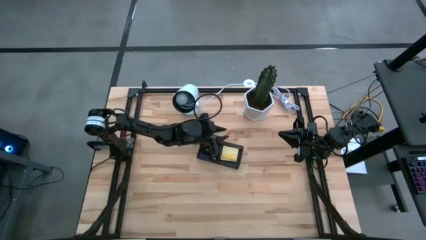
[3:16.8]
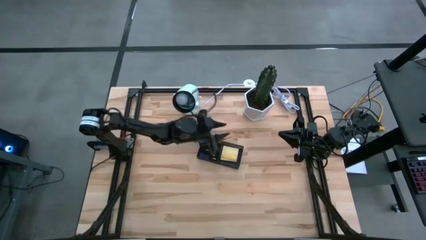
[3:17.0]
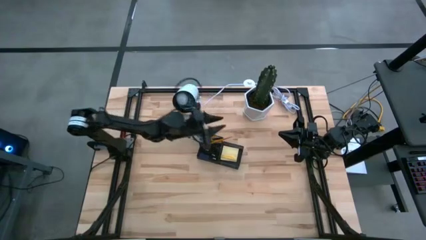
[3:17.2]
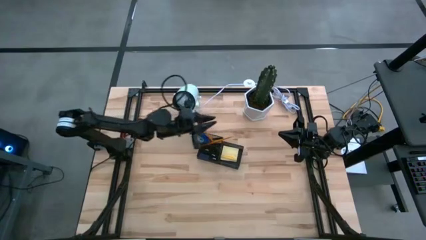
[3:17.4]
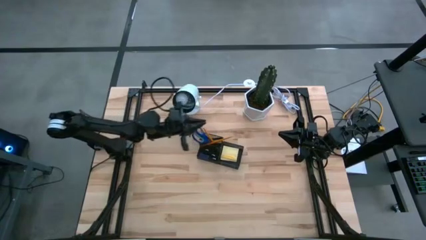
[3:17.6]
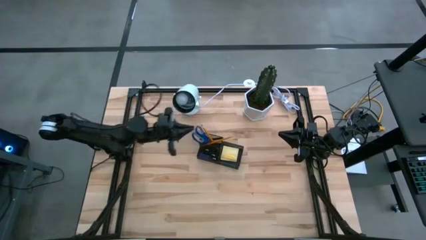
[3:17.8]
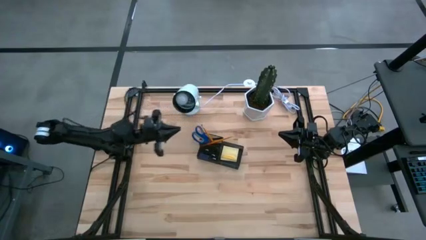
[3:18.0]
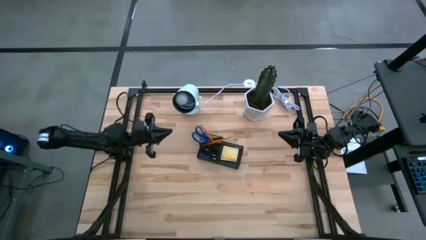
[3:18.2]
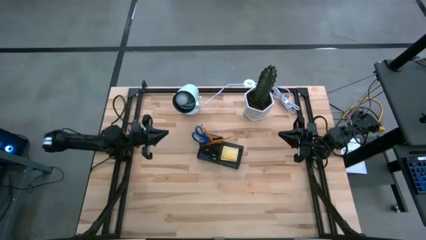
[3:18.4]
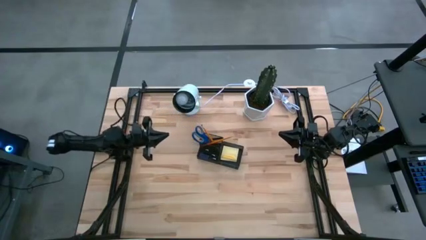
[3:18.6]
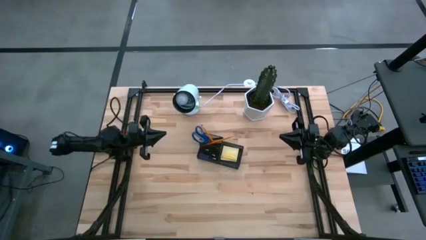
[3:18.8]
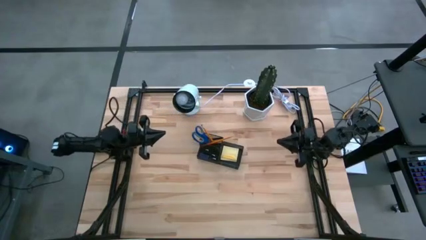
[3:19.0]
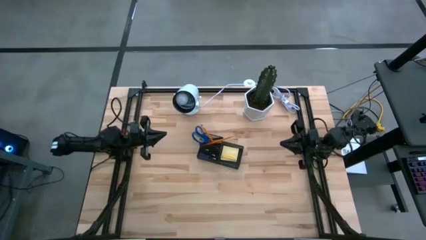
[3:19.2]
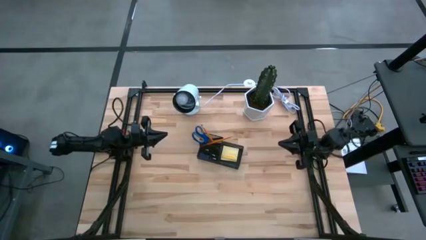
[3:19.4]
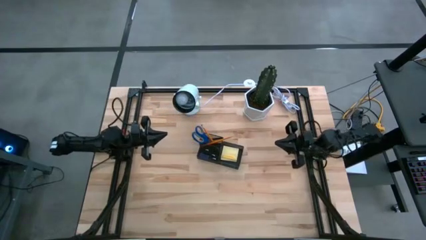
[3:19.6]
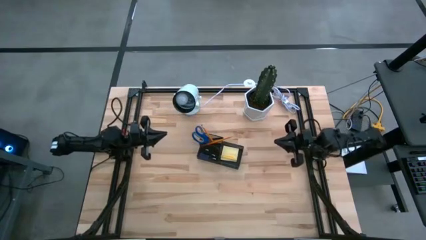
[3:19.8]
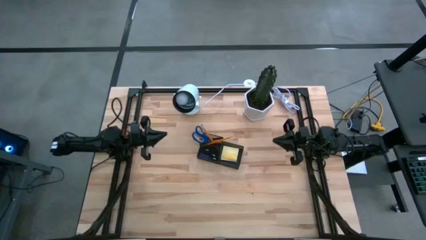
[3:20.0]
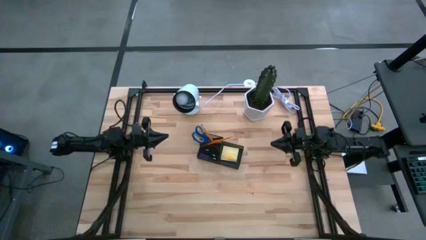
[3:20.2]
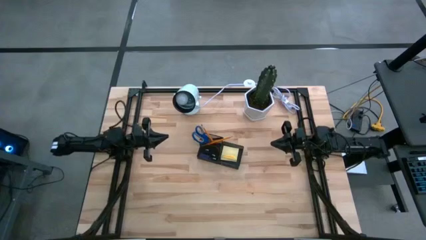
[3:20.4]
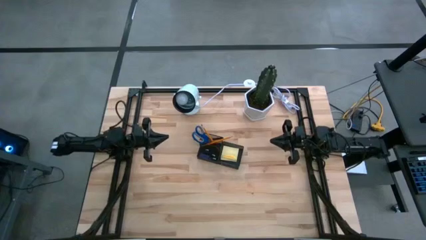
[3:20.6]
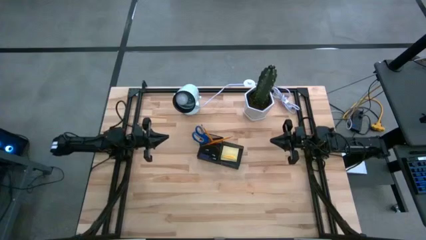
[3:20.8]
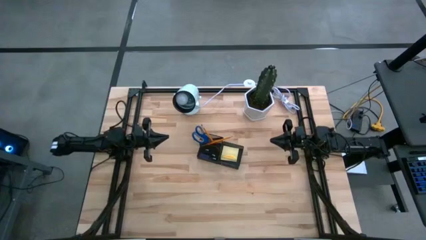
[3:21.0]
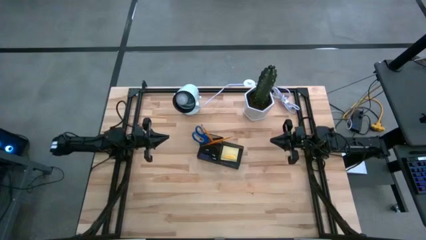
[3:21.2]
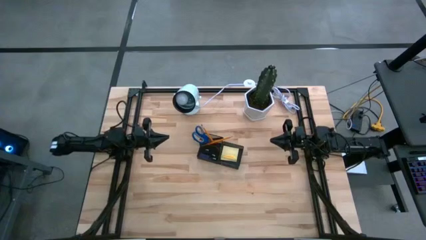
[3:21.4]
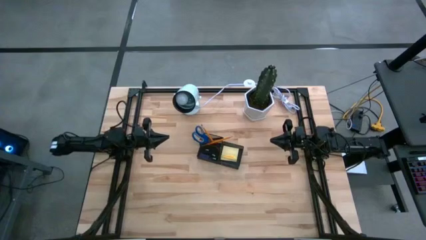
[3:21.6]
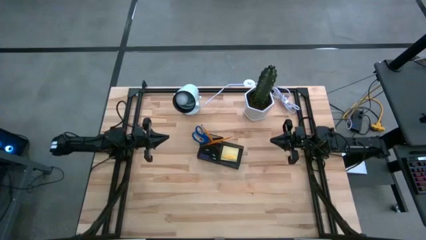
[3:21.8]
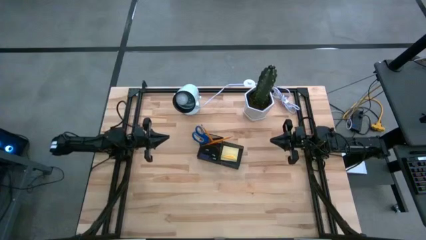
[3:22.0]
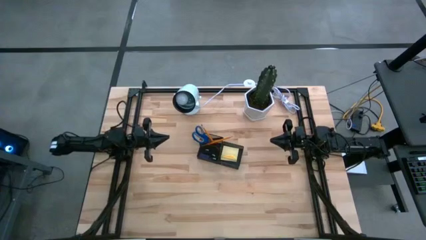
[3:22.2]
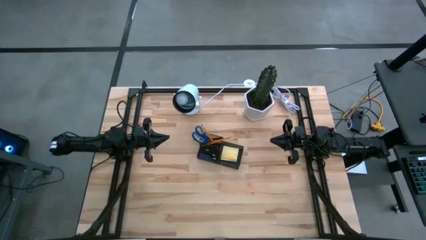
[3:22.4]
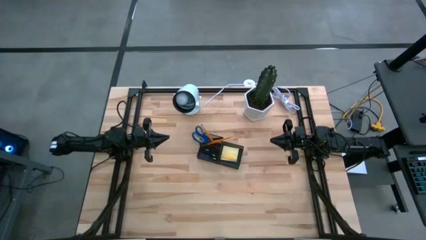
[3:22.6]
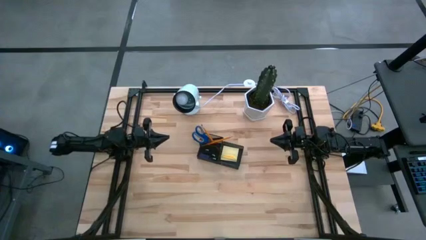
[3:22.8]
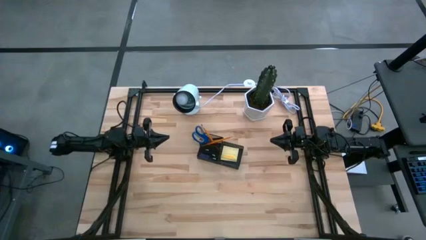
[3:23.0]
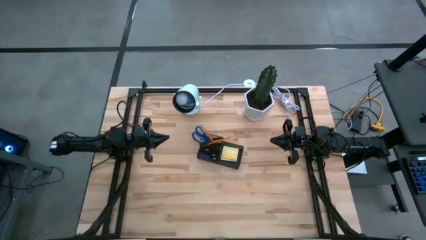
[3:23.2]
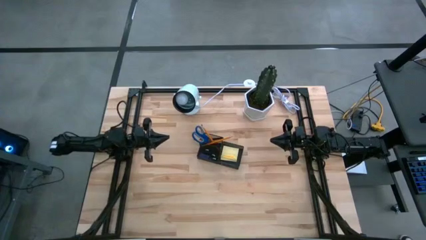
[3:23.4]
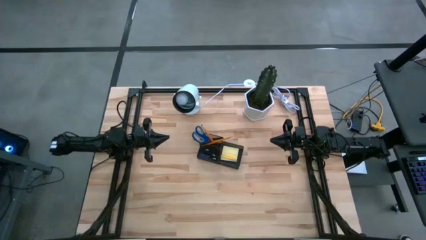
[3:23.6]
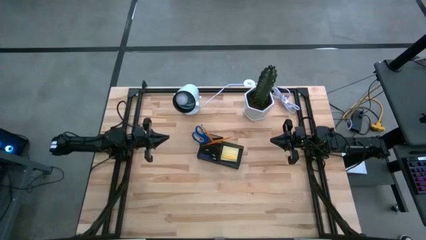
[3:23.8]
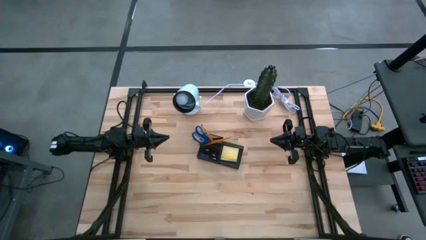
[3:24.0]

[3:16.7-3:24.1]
Task: Pick and place office supplies into organizer
Return to Home Position
